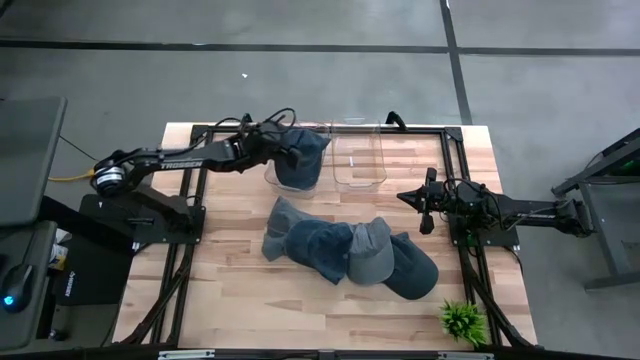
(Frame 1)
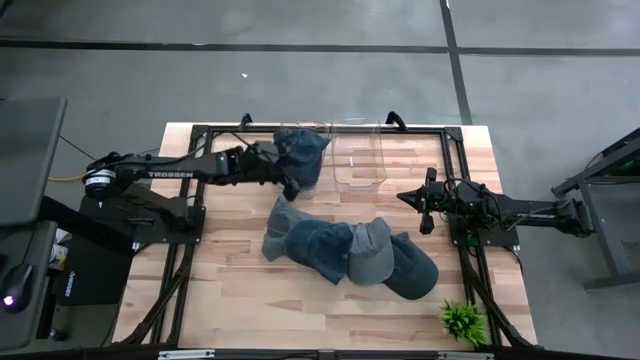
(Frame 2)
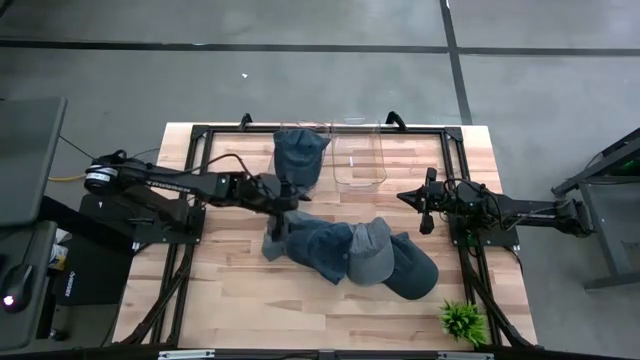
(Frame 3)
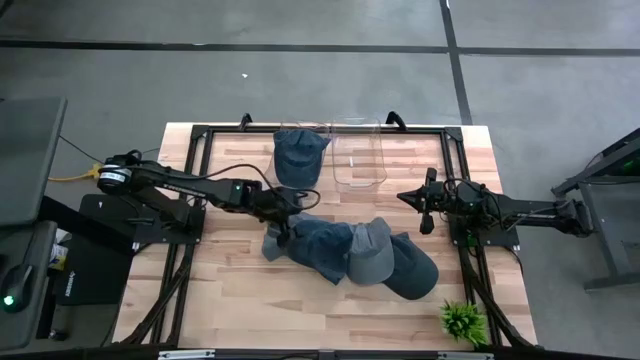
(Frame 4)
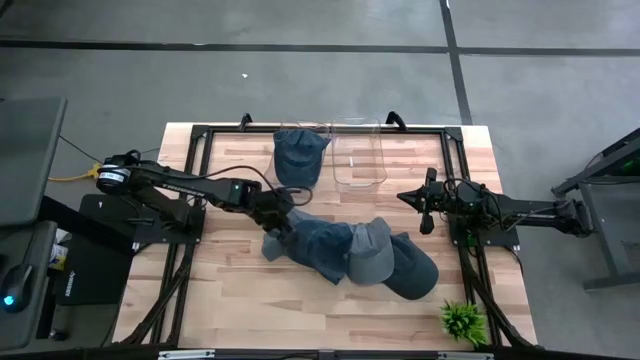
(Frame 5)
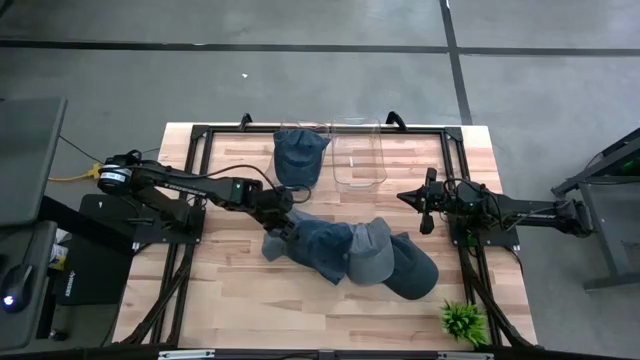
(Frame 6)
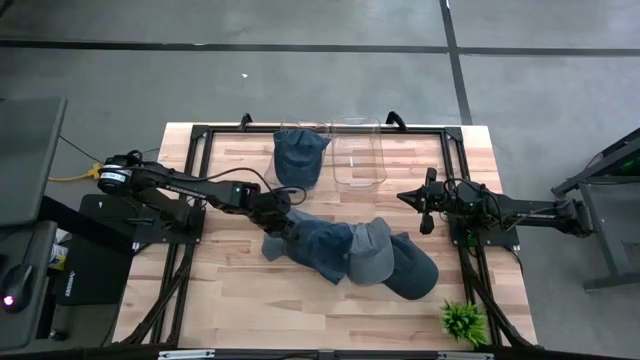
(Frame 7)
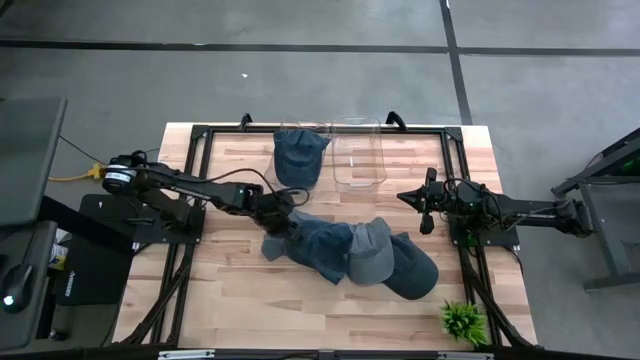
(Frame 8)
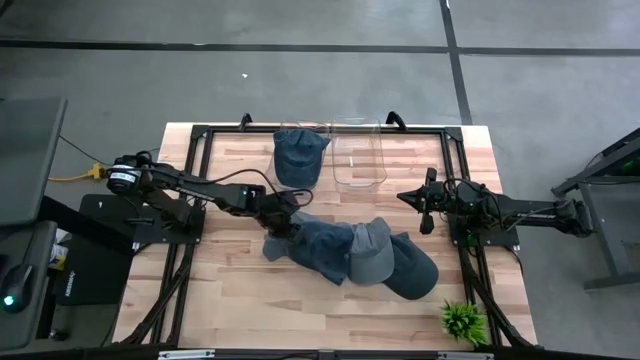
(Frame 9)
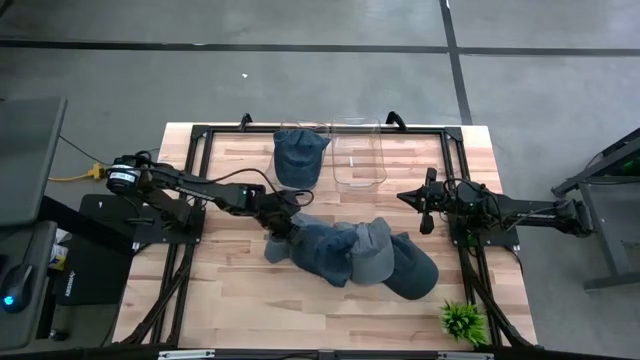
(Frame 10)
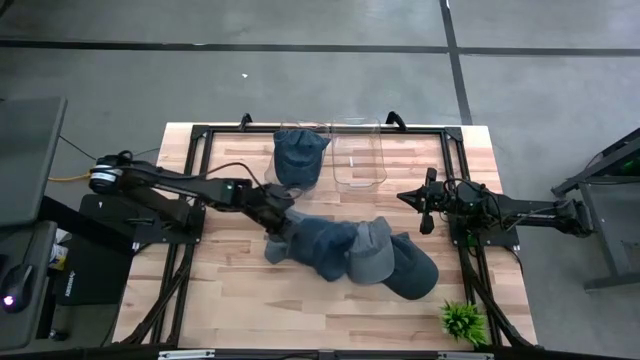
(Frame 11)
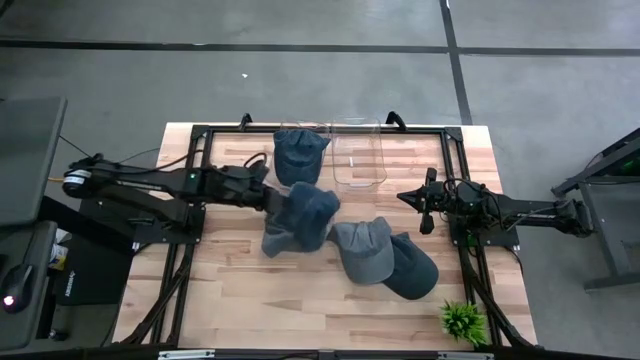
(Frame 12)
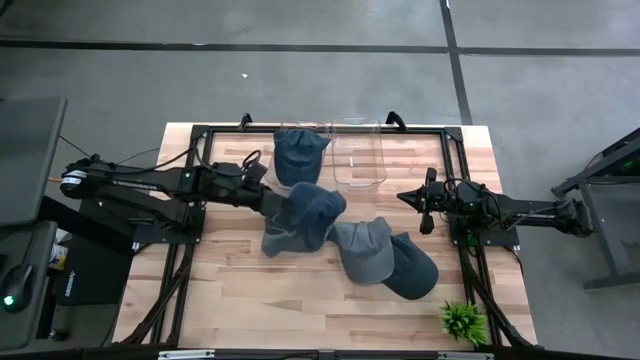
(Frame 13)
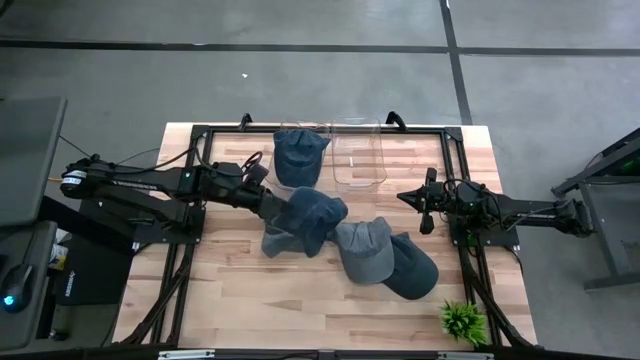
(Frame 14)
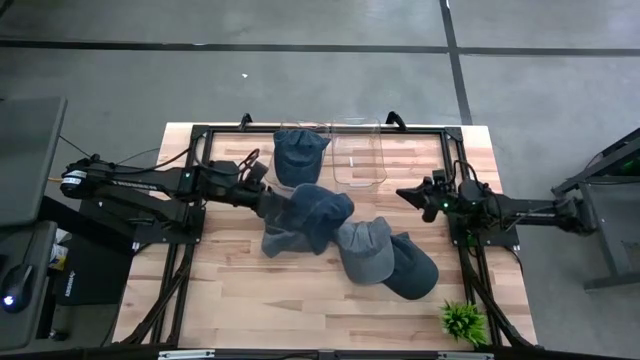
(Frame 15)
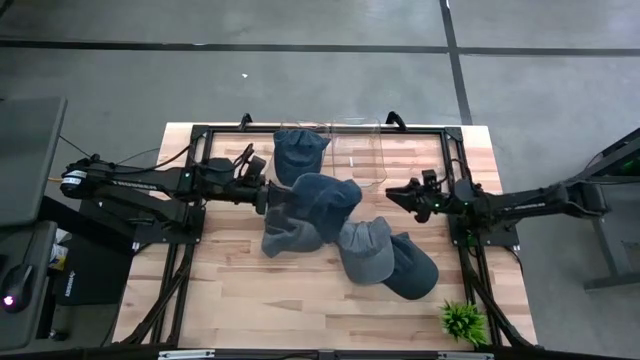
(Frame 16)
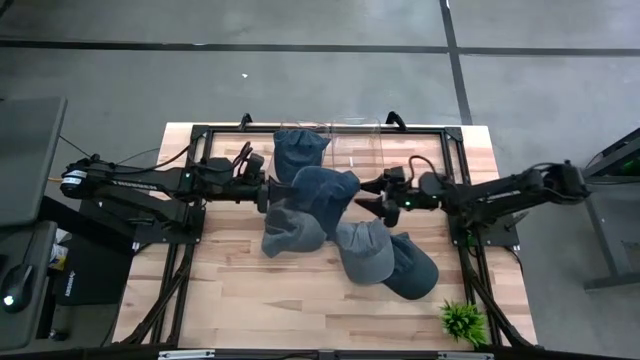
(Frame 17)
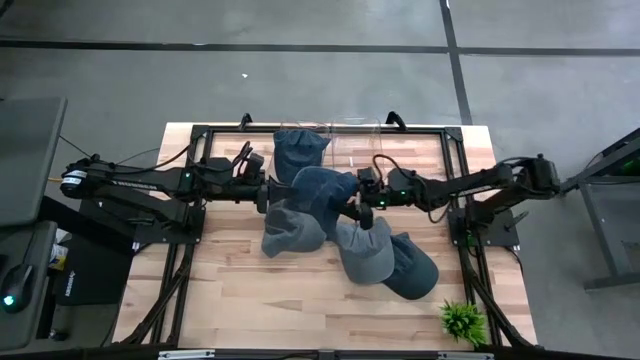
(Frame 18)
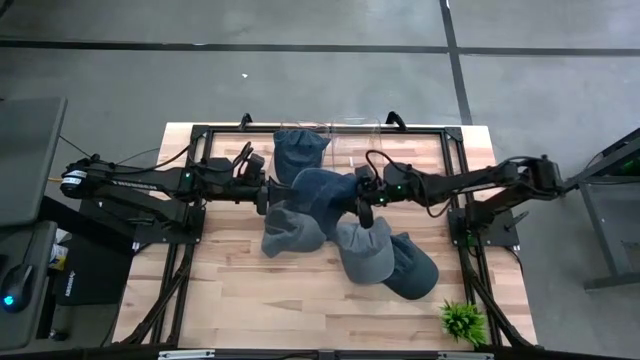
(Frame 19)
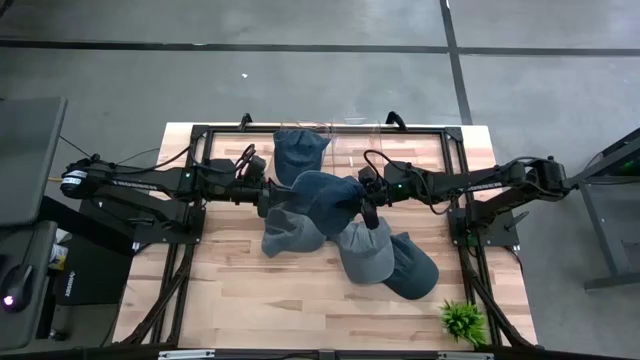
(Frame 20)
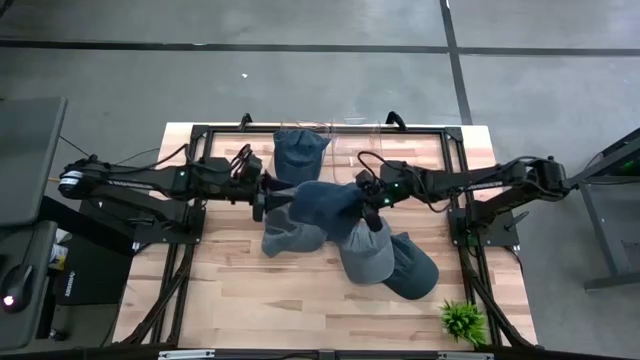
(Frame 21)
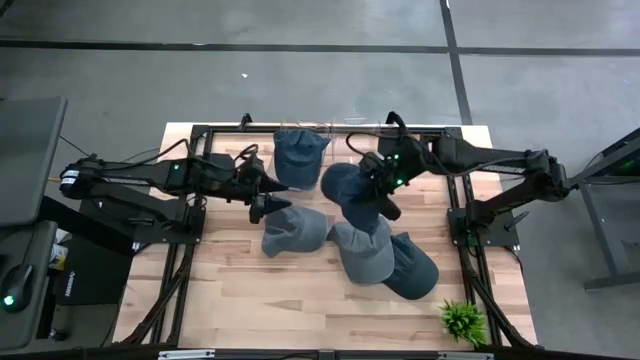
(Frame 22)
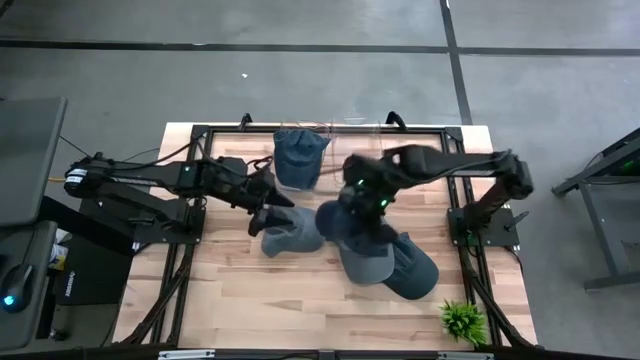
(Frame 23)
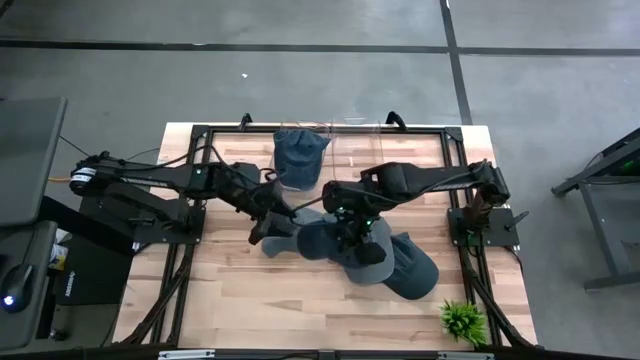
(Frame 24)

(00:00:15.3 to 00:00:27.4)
Task: Pick & Place hat
Put the left blue cap into the left transparent bin

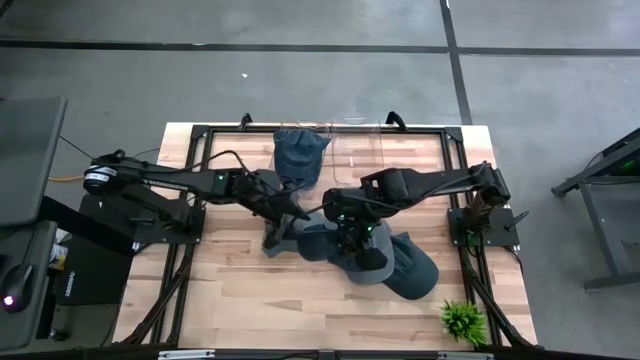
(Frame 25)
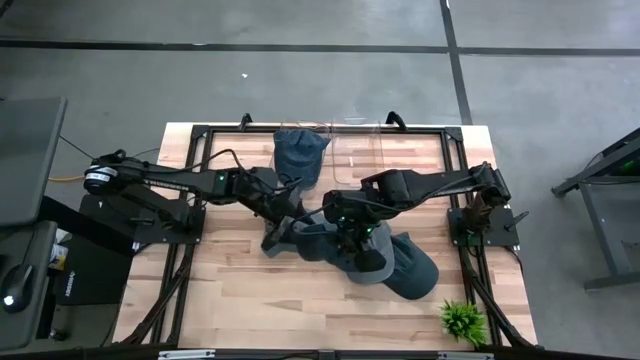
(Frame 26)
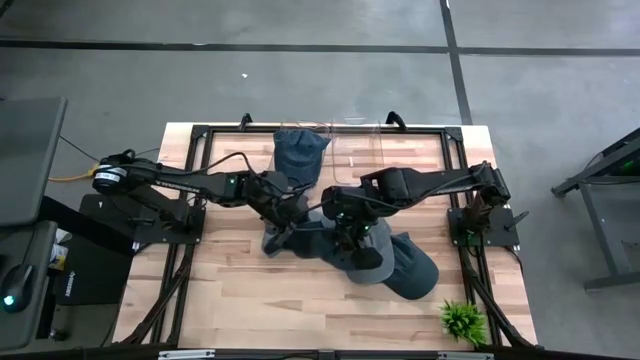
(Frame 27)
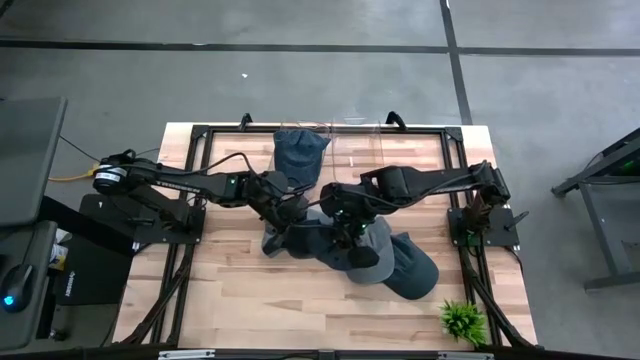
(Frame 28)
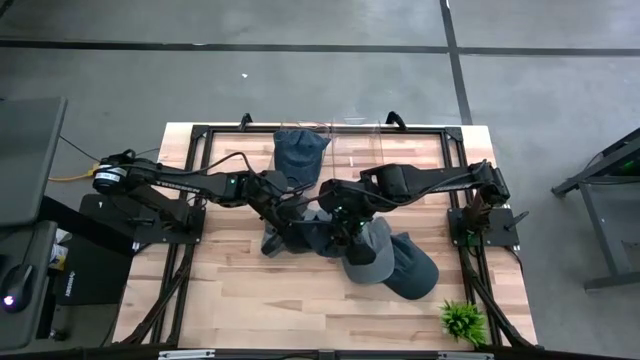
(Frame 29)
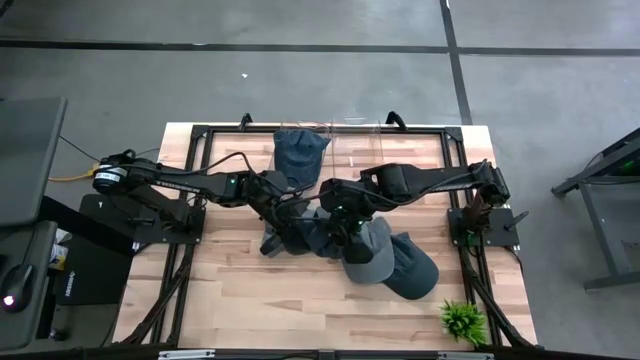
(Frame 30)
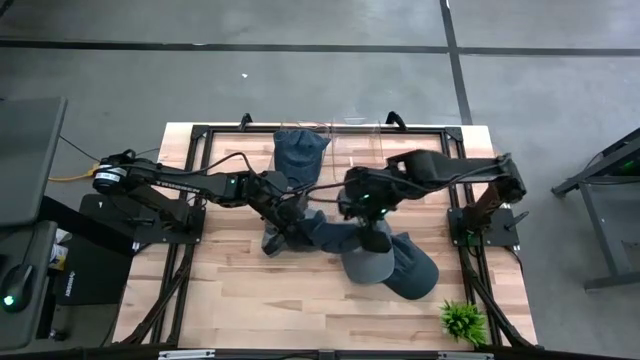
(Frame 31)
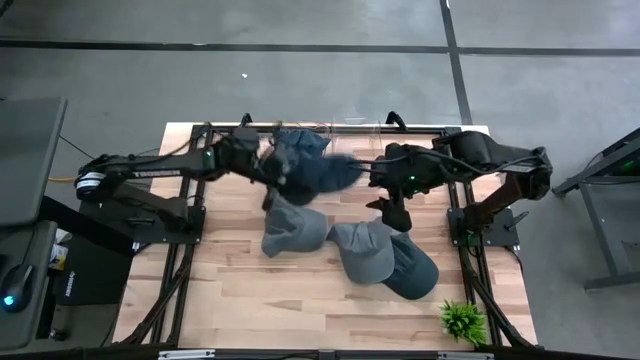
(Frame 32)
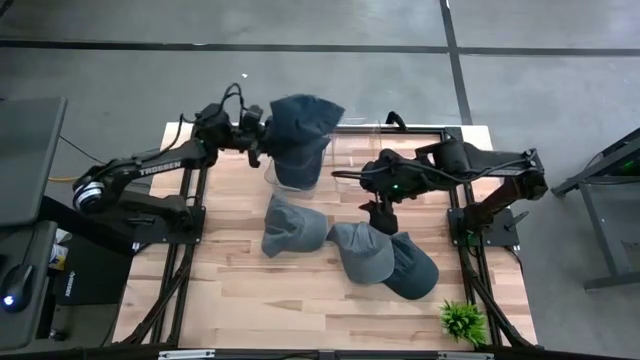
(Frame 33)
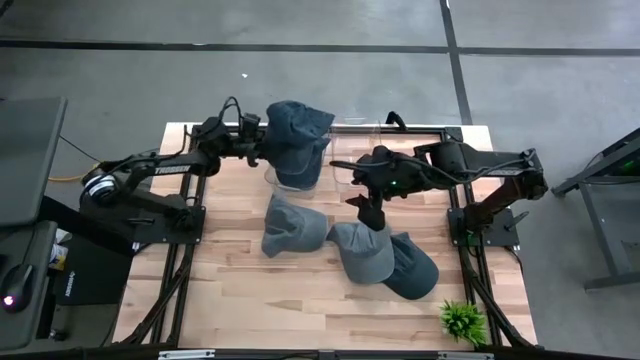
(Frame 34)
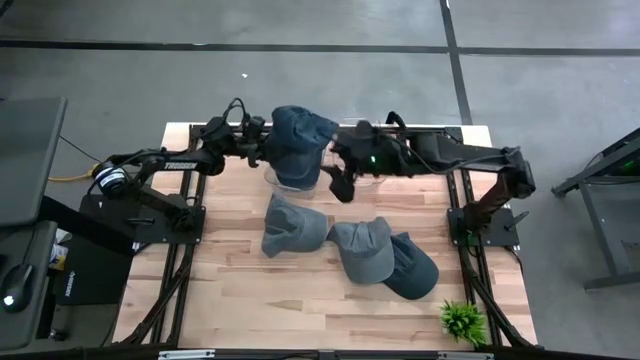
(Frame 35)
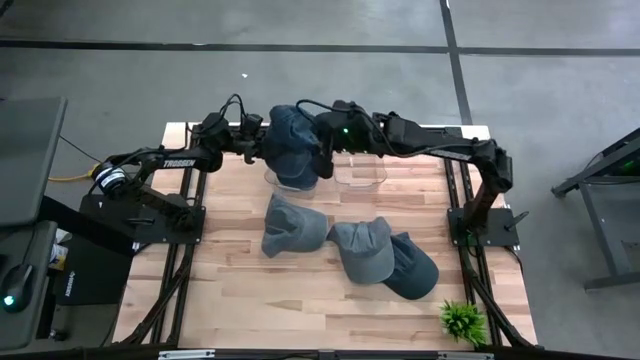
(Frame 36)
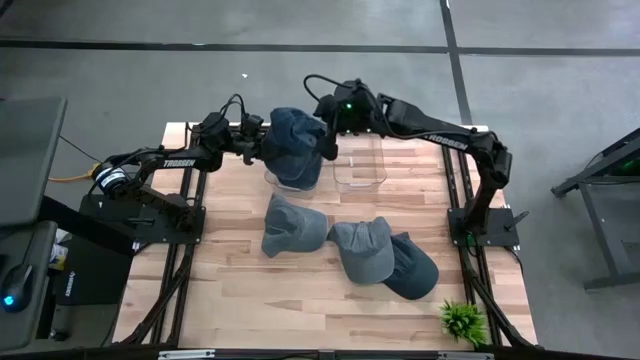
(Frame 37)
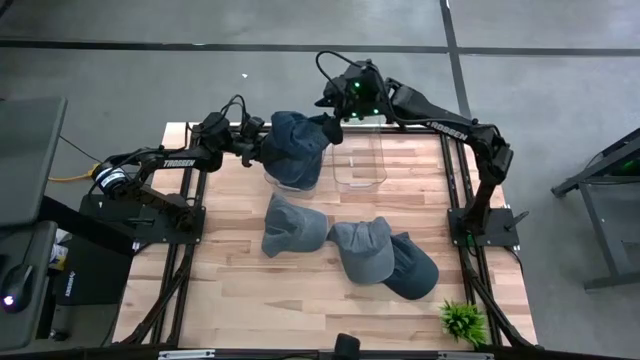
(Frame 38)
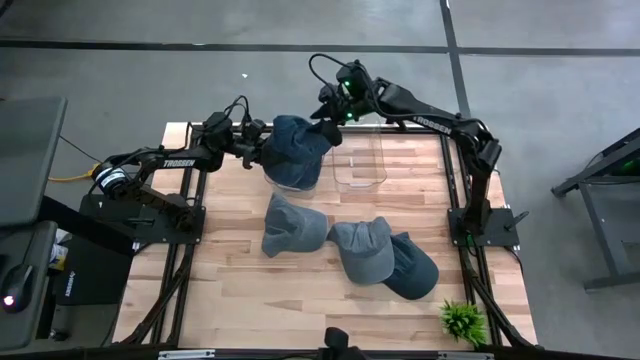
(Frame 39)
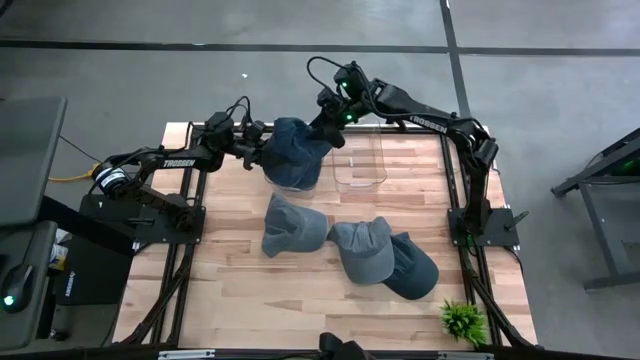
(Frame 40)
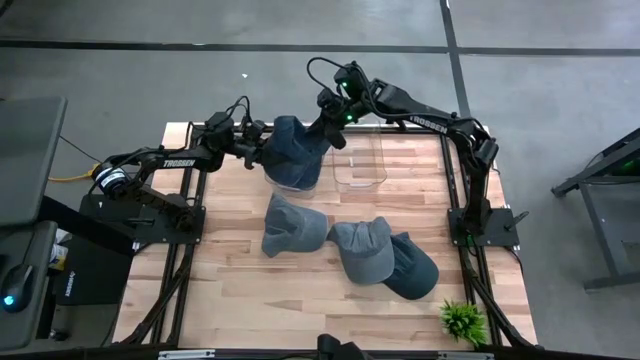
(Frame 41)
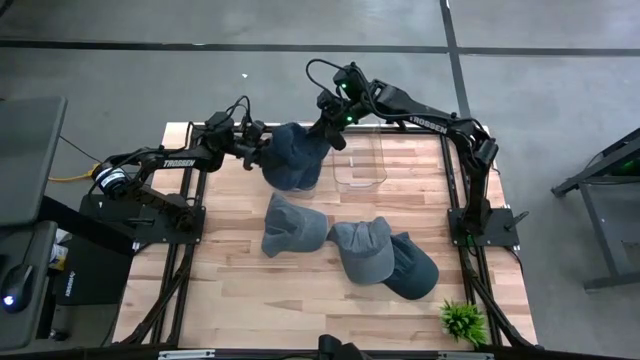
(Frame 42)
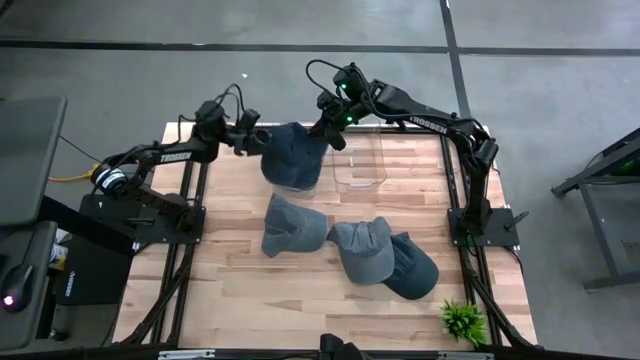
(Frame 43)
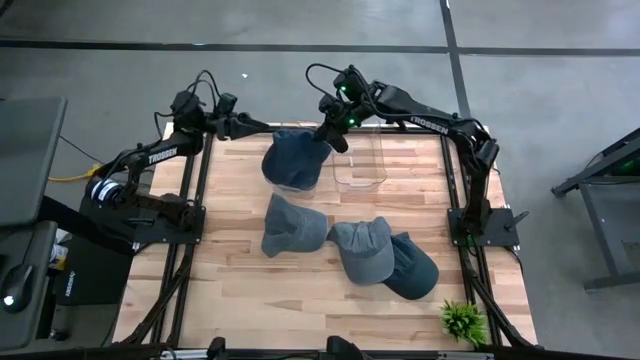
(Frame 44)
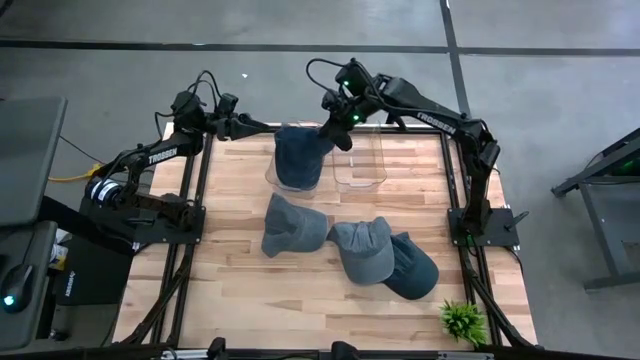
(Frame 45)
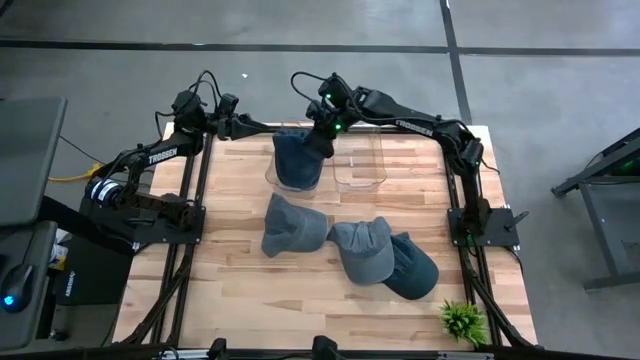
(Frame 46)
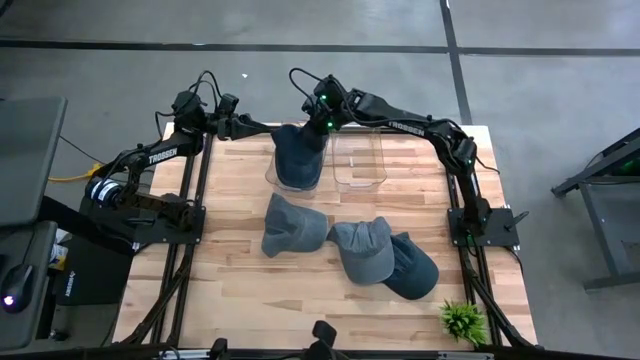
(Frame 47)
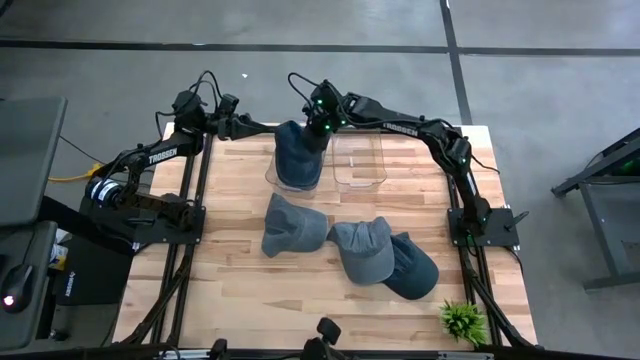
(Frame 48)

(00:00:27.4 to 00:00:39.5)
Put the left blue cap into the left transparent bin
